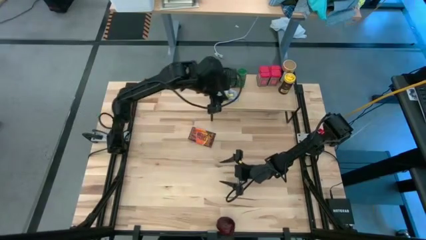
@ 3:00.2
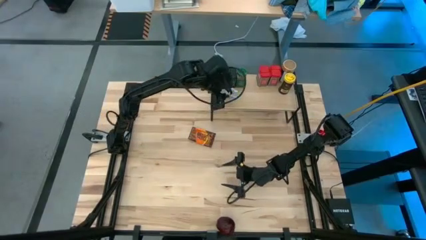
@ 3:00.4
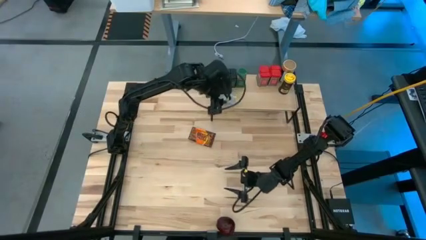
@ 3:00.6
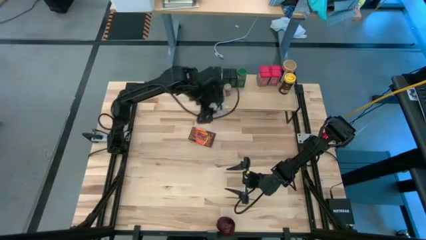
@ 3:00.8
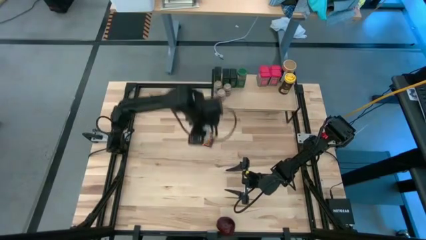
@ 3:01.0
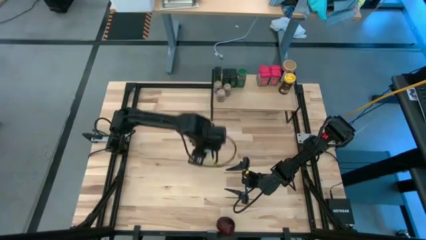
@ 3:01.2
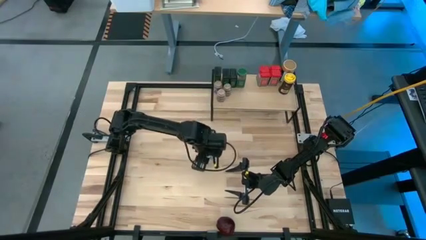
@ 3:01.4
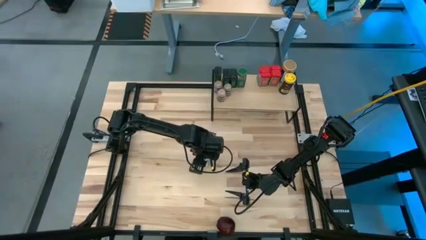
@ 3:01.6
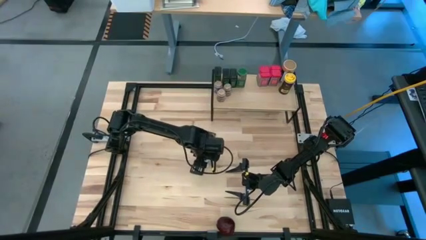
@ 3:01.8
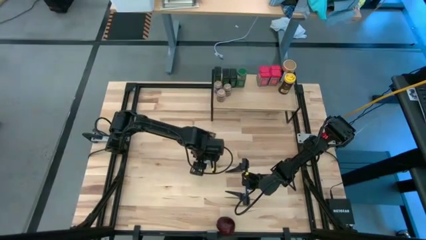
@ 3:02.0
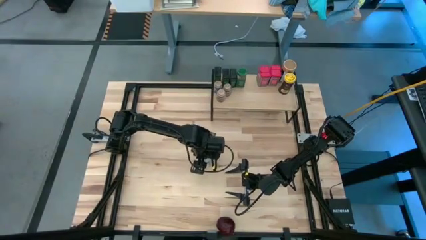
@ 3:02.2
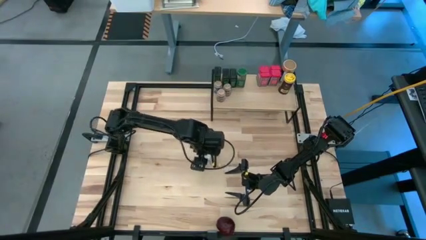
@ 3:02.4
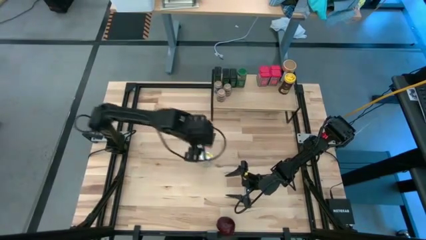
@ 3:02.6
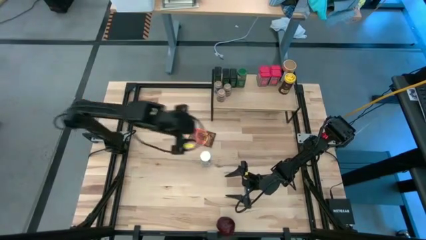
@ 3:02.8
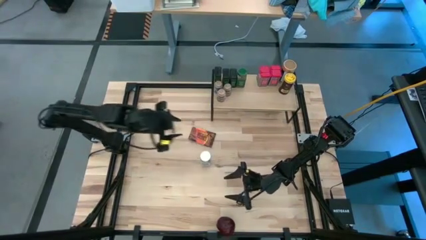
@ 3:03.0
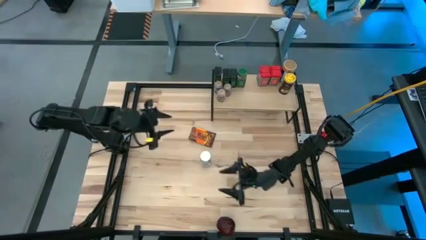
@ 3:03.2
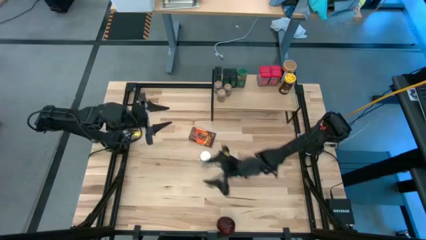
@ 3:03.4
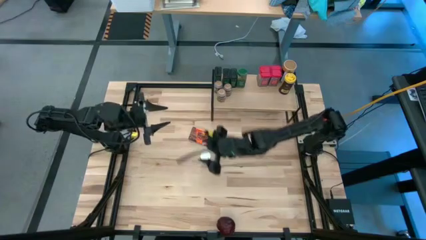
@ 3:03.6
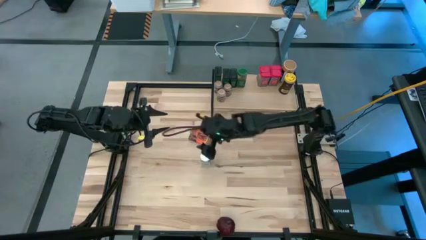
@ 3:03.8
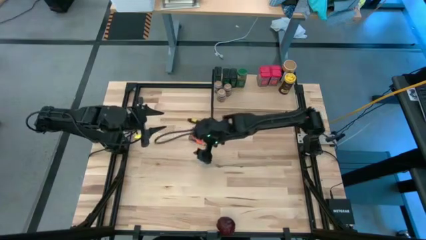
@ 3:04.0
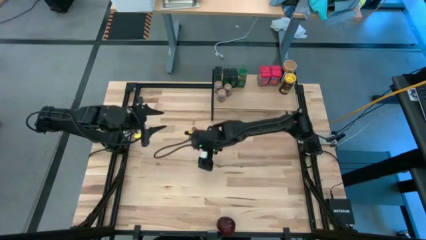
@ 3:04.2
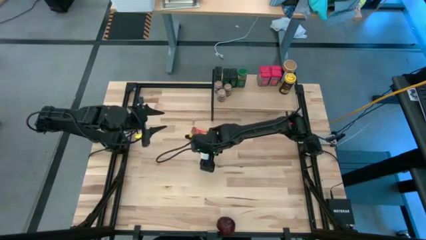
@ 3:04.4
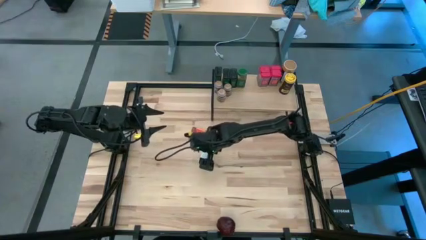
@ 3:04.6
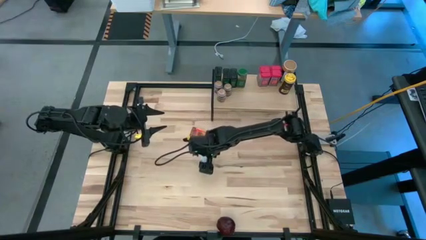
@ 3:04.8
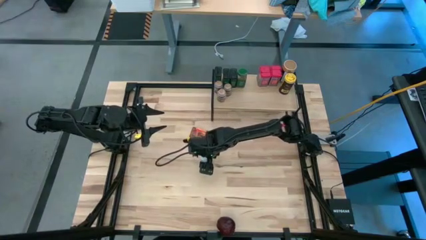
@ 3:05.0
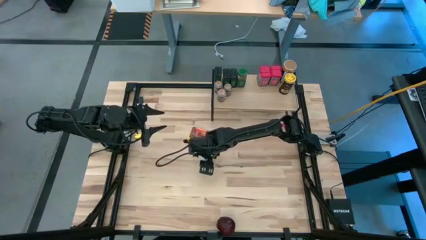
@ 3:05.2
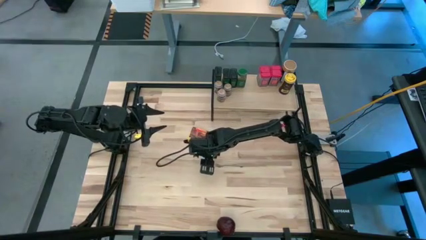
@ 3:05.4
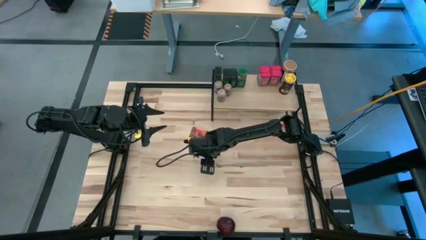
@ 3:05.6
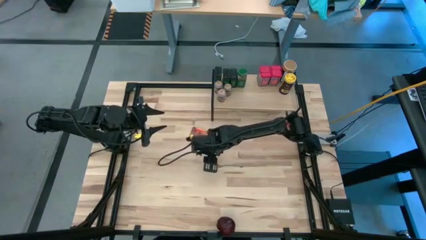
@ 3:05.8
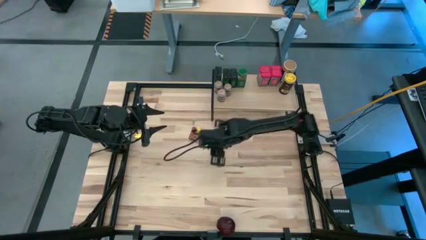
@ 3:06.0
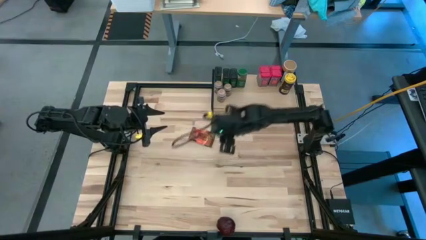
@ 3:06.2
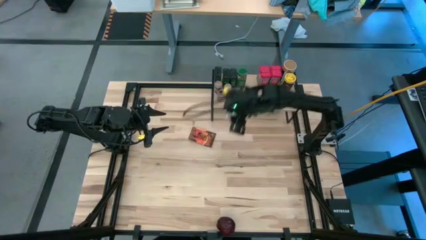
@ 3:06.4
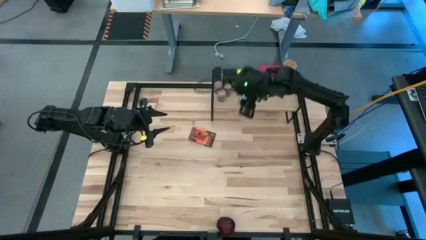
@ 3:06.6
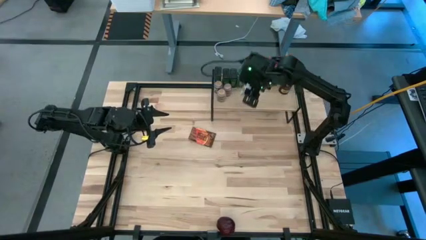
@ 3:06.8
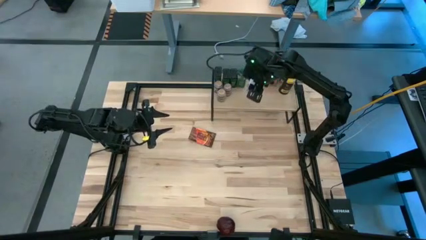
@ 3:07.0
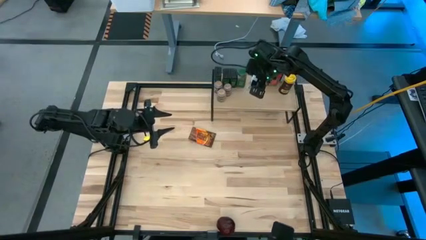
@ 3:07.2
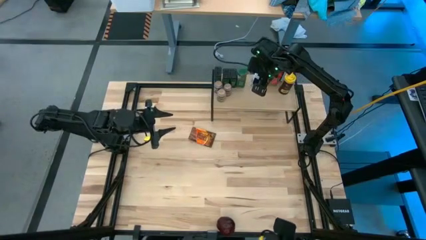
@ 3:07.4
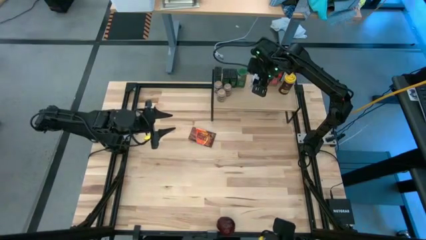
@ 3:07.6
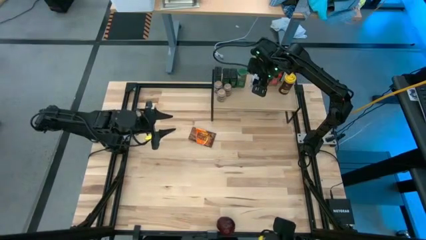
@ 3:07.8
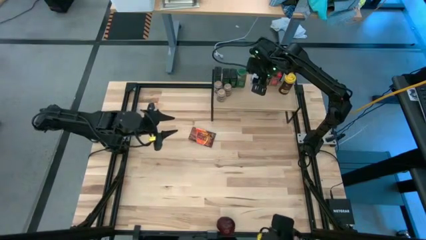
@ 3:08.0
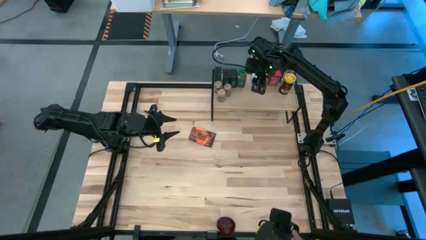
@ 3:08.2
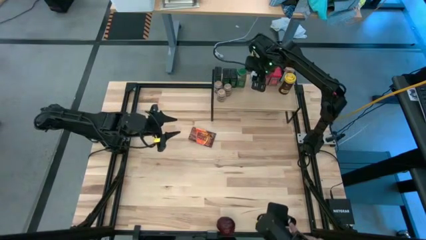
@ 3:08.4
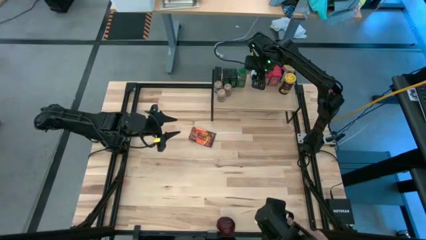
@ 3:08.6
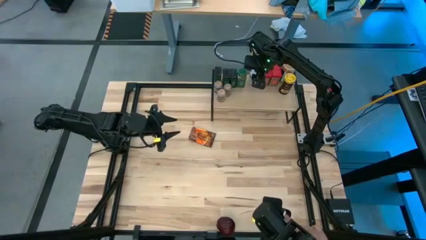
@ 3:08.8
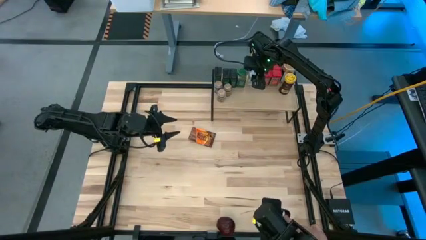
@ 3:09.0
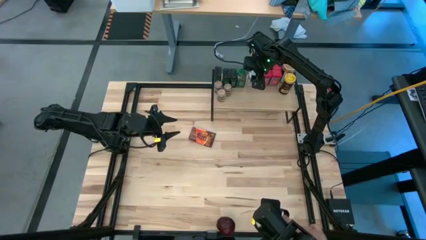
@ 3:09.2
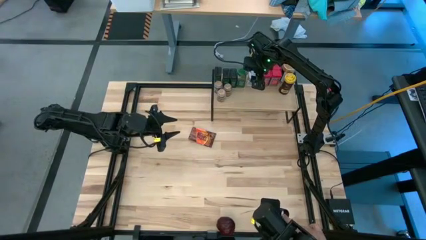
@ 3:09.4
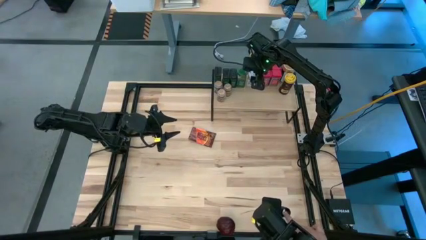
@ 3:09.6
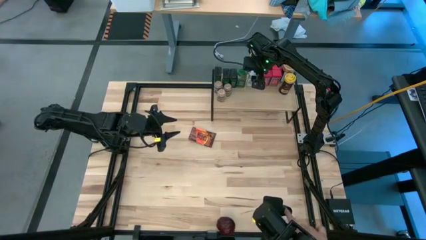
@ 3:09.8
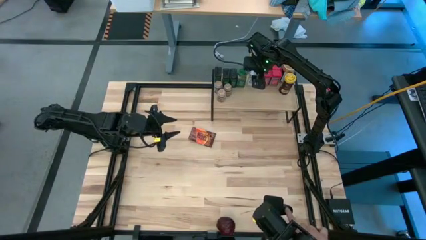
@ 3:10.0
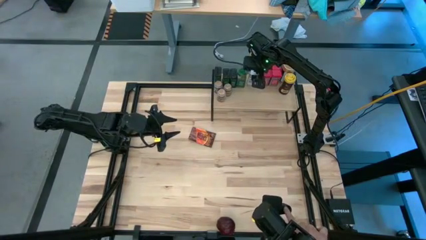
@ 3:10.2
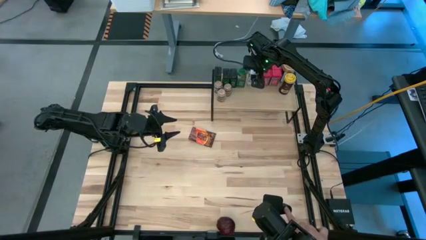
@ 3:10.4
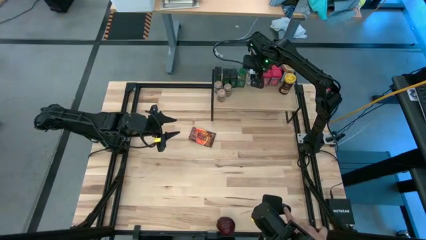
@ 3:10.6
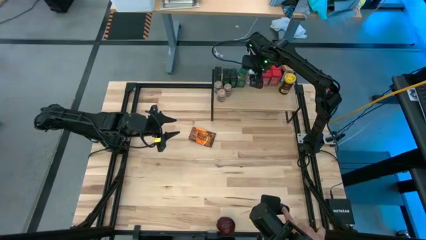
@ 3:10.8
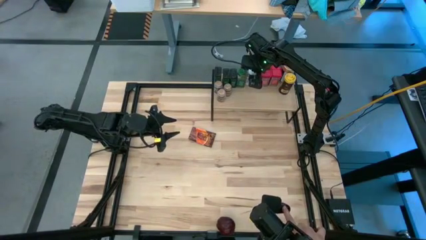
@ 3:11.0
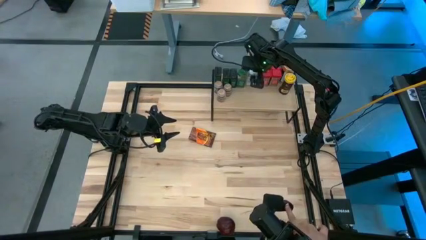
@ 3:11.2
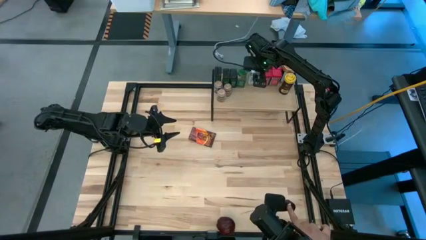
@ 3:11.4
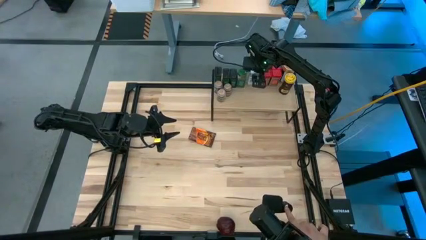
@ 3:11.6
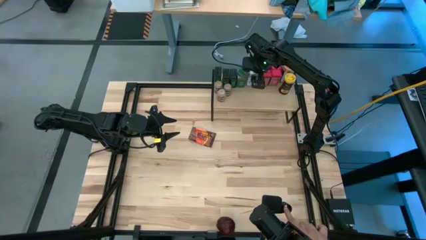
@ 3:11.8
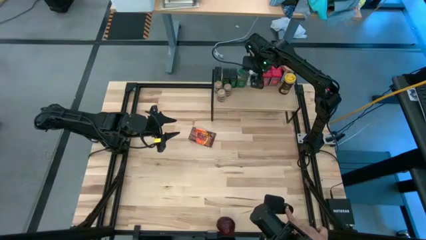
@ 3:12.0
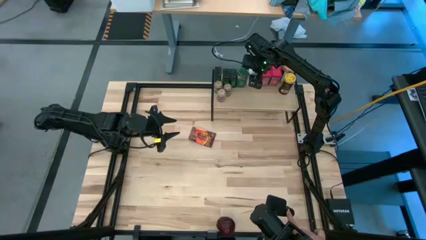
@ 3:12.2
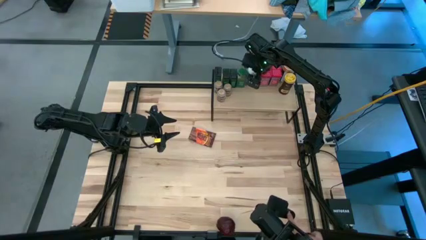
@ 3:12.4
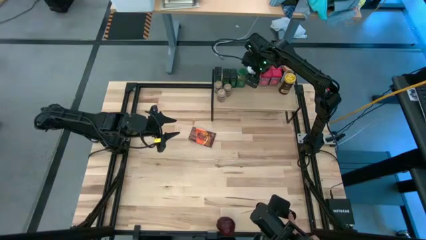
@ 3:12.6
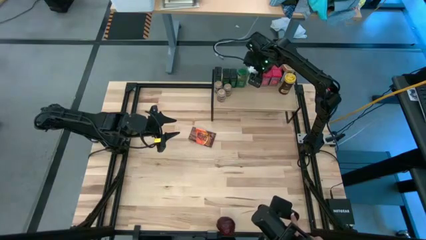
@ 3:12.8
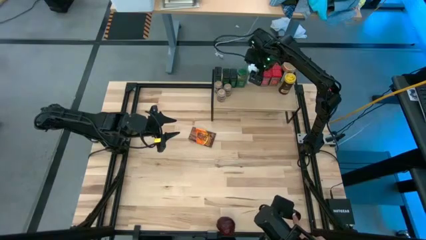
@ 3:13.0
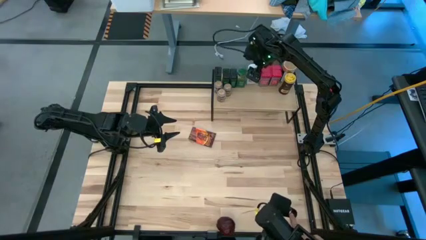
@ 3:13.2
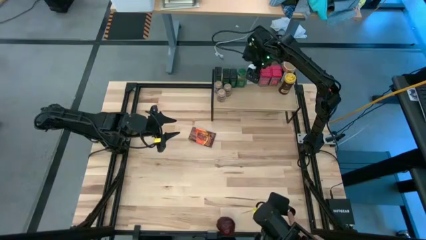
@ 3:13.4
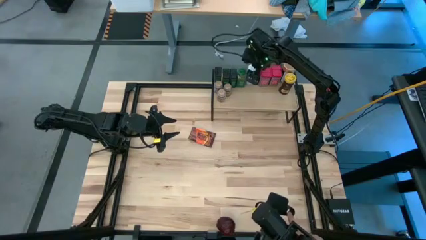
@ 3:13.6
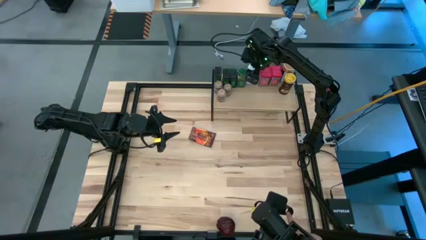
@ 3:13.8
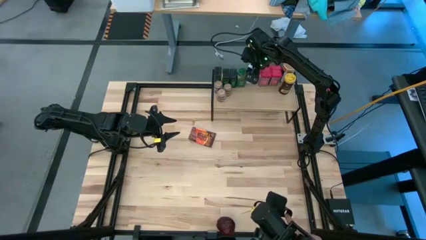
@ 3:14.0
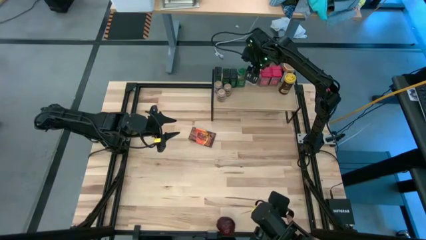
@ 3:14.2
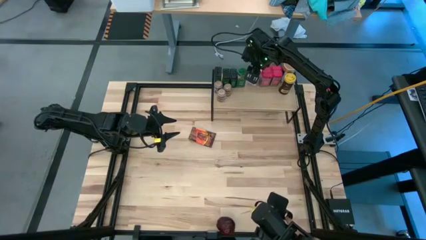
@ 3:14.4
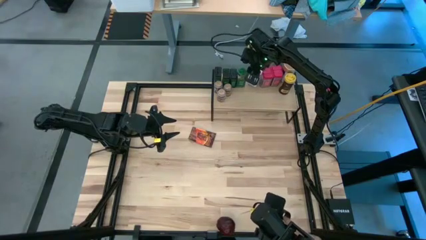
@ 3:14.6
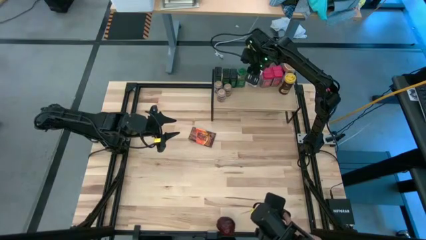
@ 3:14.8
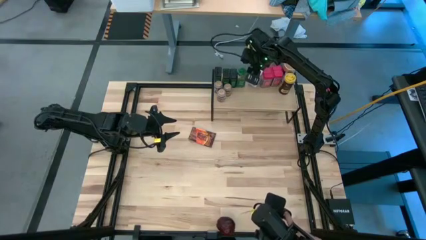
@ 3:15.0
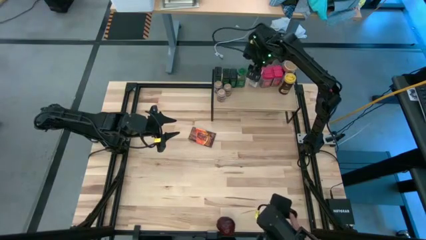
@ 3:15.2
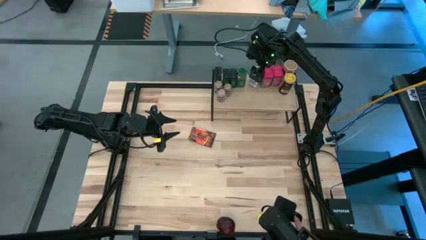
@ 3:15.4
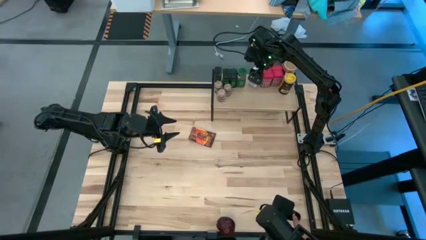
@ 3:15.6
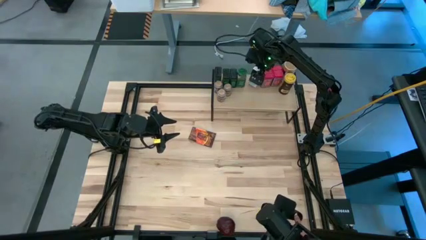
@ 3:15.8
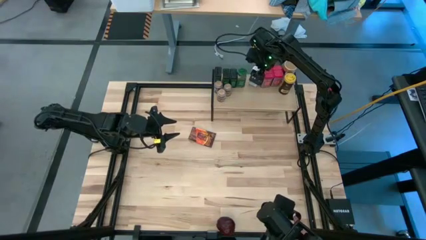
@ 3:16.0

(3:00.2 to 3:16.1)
Task: Shelf spices
Put the white seasoning can on the shelf
